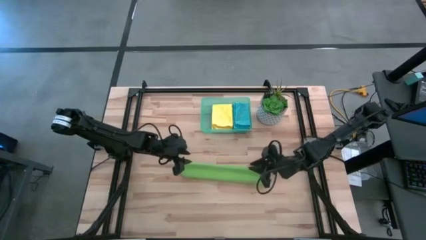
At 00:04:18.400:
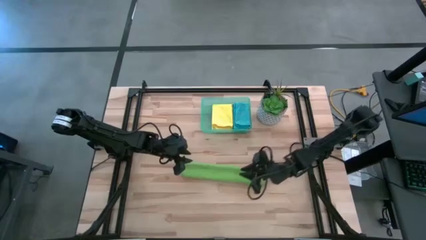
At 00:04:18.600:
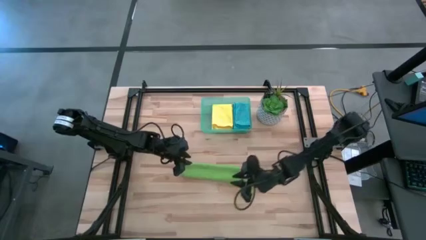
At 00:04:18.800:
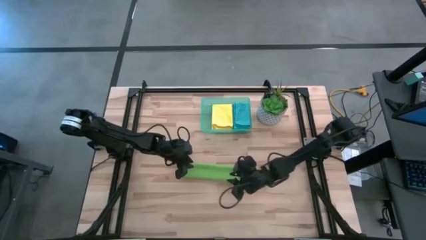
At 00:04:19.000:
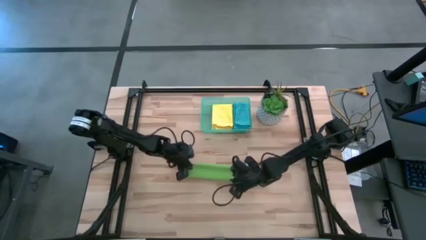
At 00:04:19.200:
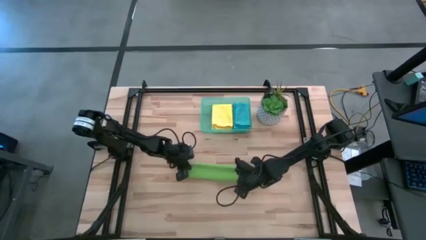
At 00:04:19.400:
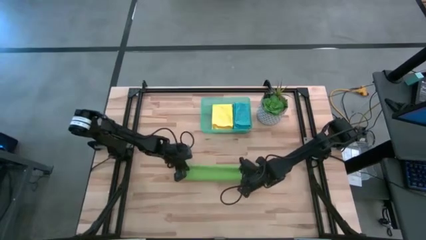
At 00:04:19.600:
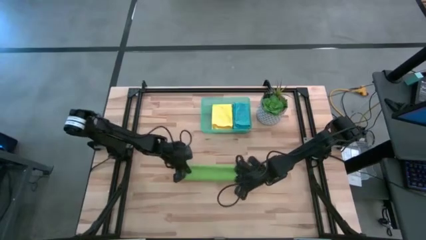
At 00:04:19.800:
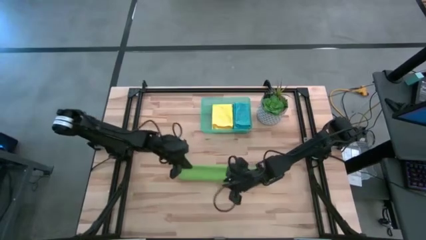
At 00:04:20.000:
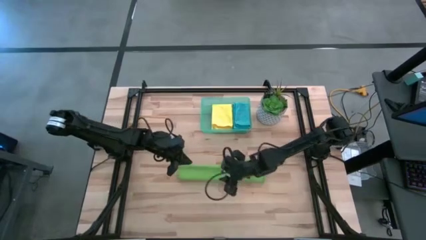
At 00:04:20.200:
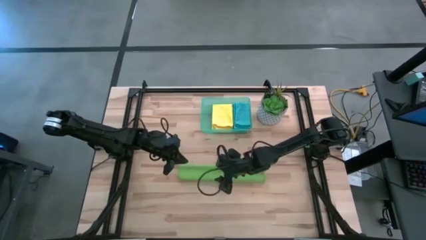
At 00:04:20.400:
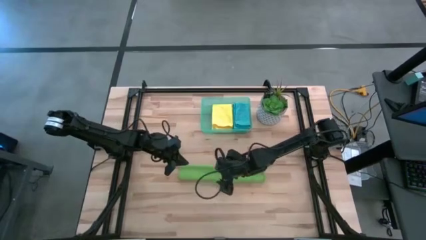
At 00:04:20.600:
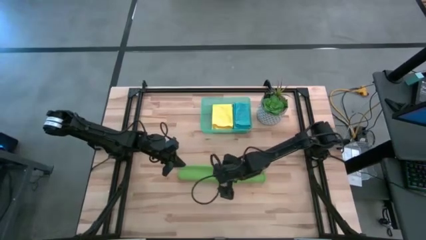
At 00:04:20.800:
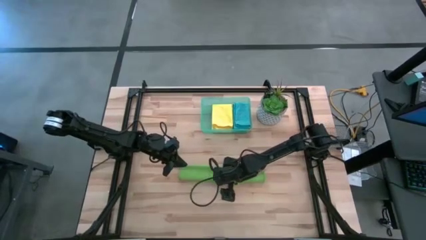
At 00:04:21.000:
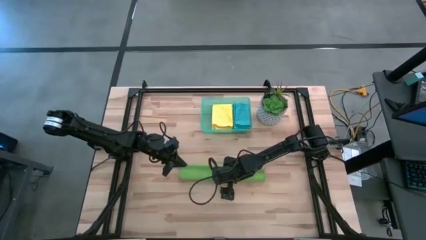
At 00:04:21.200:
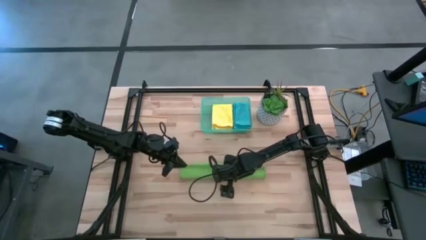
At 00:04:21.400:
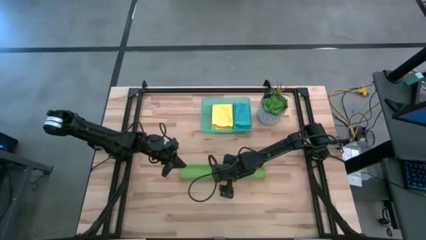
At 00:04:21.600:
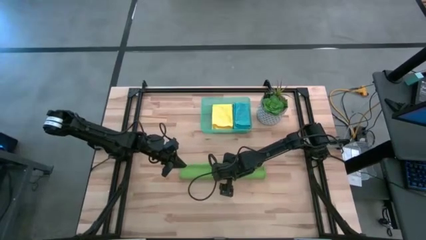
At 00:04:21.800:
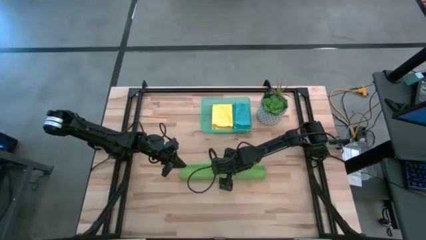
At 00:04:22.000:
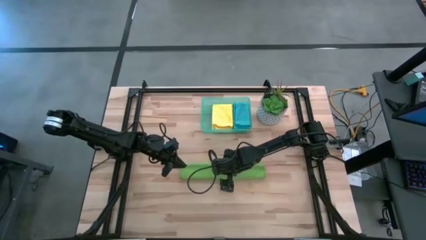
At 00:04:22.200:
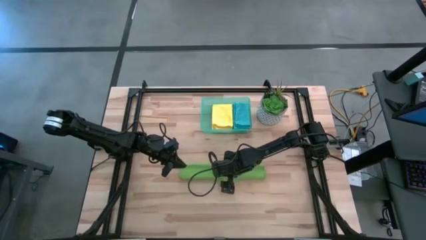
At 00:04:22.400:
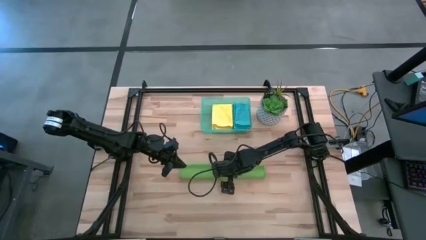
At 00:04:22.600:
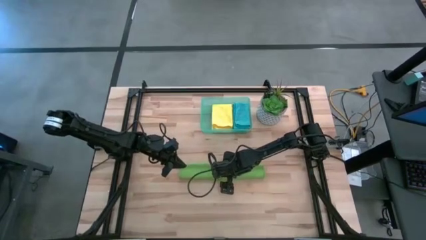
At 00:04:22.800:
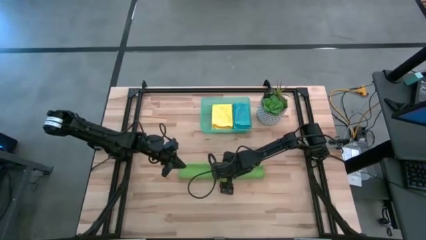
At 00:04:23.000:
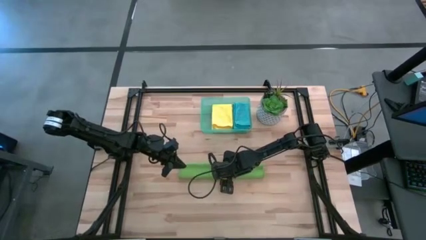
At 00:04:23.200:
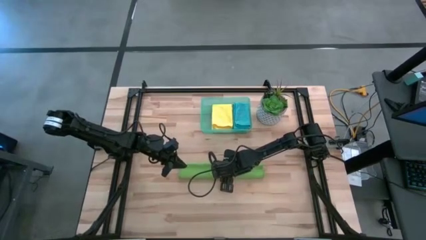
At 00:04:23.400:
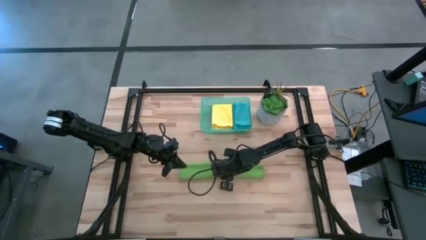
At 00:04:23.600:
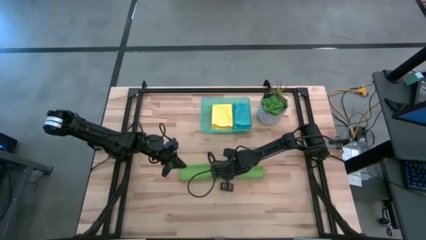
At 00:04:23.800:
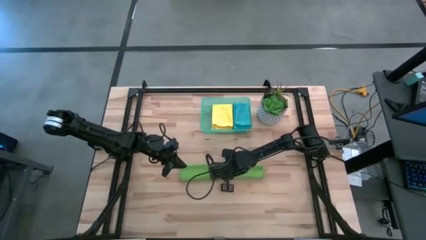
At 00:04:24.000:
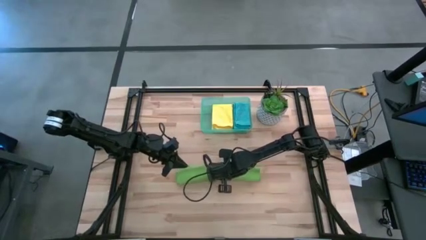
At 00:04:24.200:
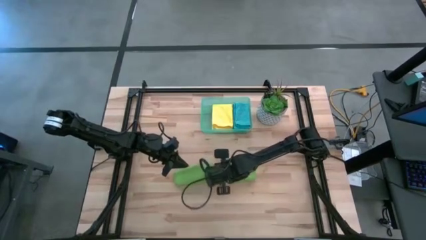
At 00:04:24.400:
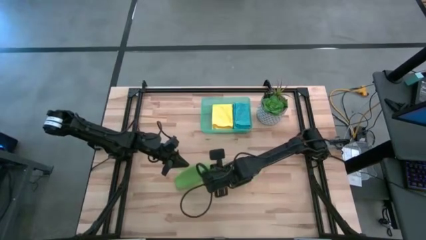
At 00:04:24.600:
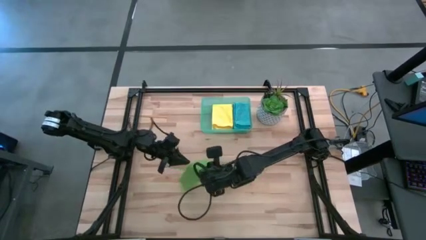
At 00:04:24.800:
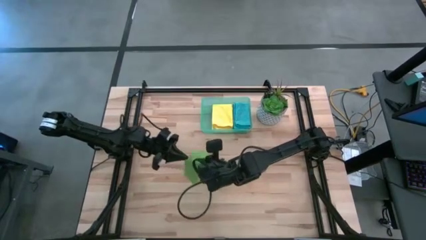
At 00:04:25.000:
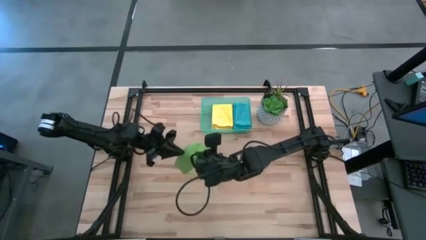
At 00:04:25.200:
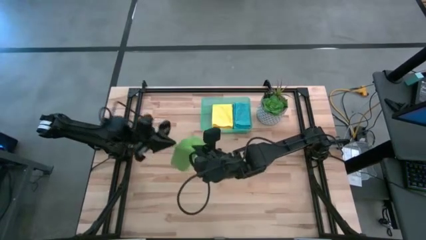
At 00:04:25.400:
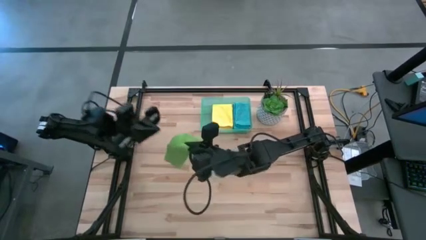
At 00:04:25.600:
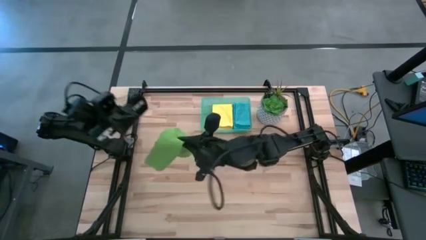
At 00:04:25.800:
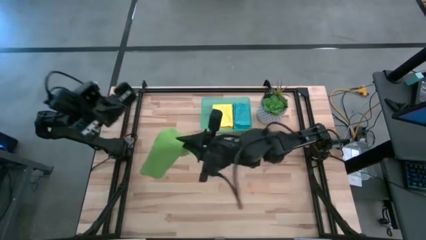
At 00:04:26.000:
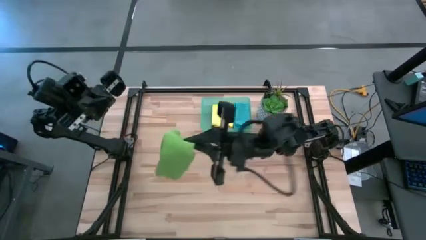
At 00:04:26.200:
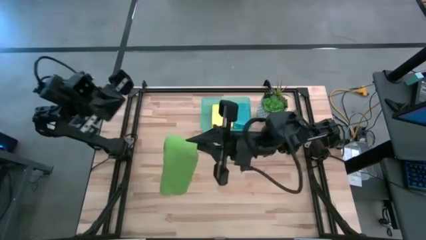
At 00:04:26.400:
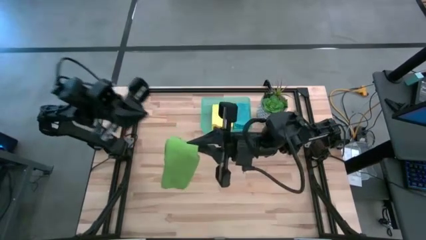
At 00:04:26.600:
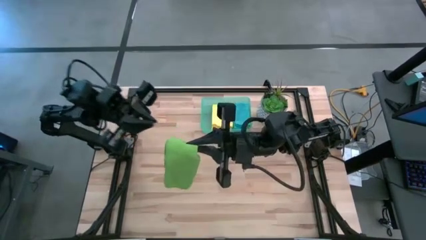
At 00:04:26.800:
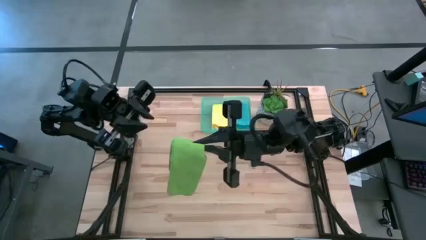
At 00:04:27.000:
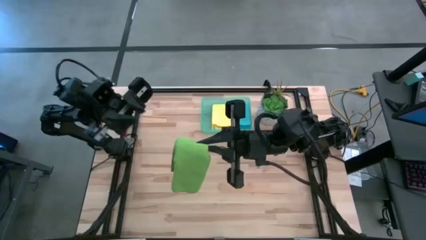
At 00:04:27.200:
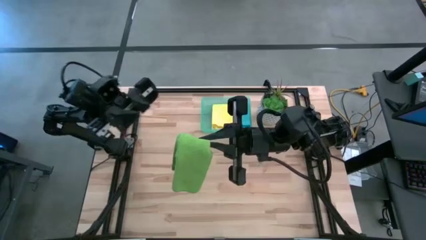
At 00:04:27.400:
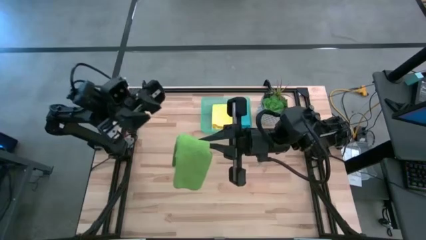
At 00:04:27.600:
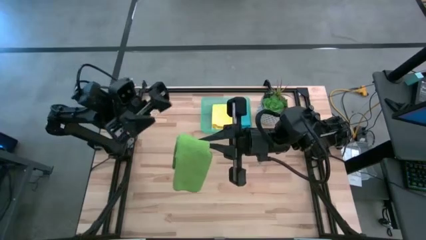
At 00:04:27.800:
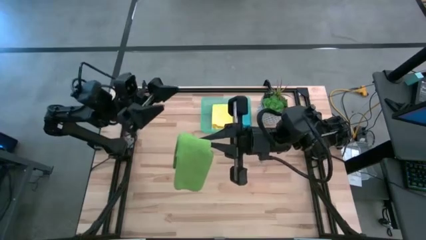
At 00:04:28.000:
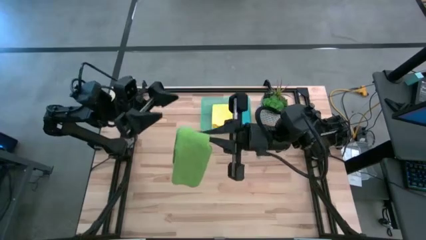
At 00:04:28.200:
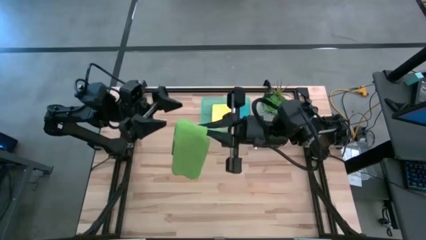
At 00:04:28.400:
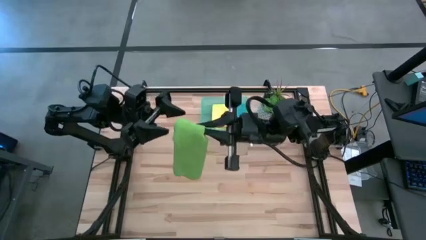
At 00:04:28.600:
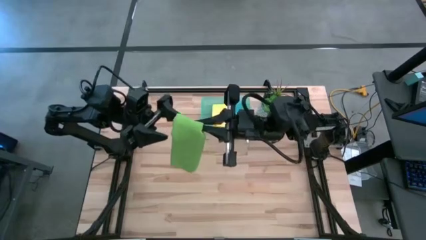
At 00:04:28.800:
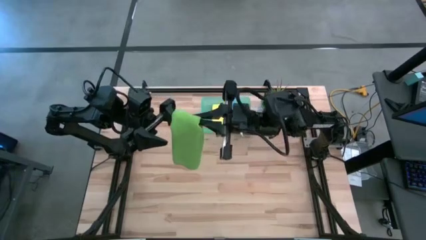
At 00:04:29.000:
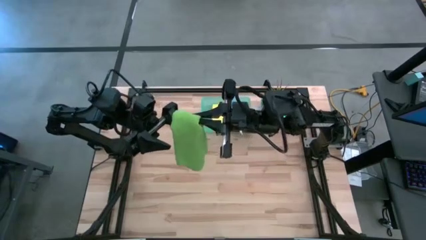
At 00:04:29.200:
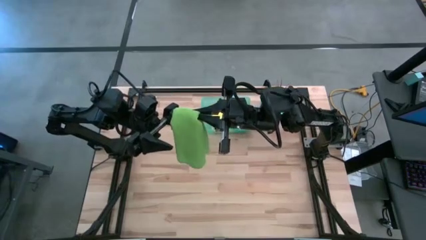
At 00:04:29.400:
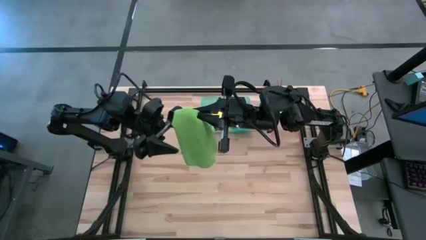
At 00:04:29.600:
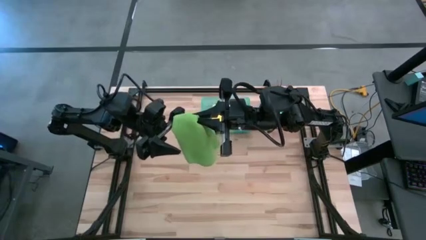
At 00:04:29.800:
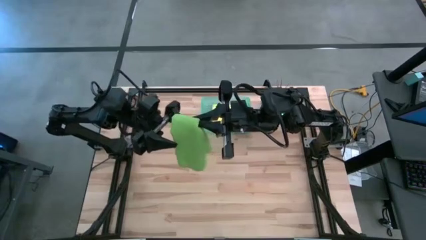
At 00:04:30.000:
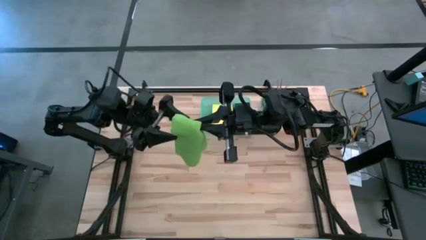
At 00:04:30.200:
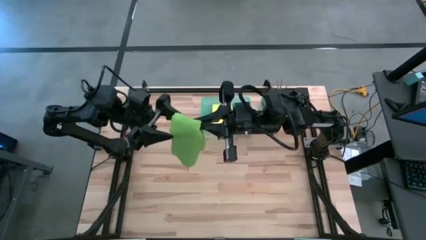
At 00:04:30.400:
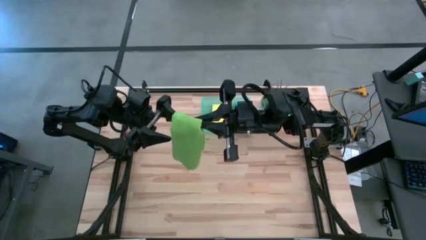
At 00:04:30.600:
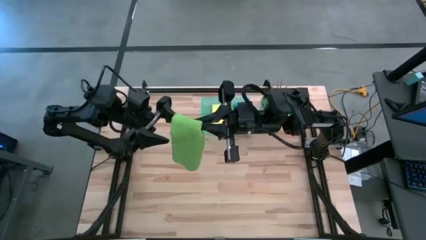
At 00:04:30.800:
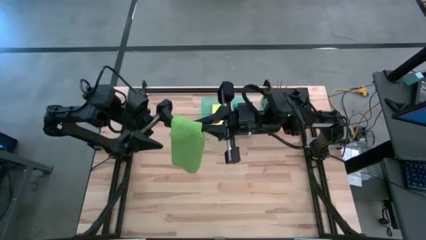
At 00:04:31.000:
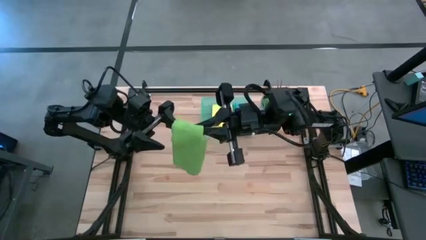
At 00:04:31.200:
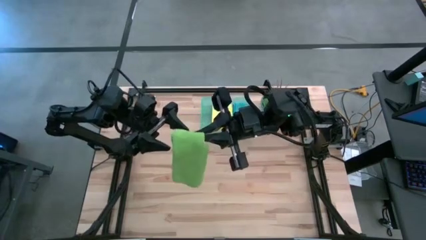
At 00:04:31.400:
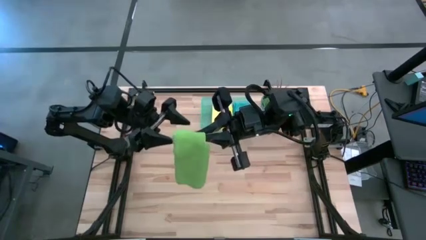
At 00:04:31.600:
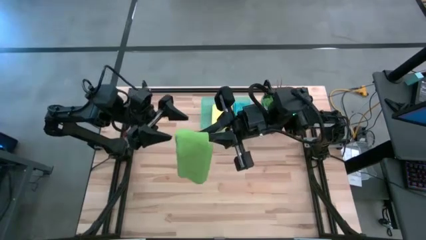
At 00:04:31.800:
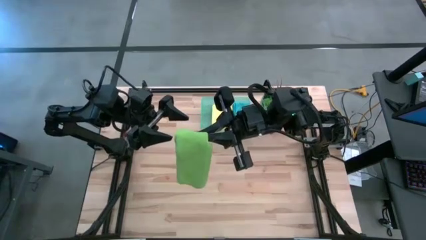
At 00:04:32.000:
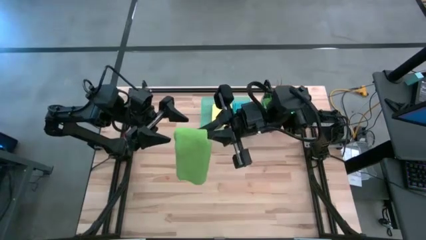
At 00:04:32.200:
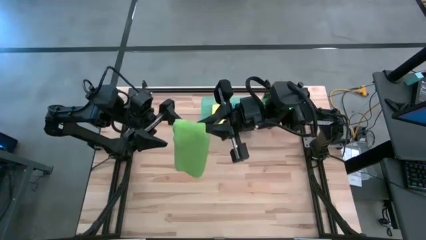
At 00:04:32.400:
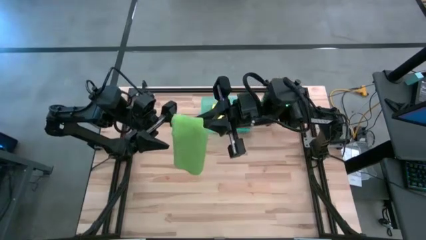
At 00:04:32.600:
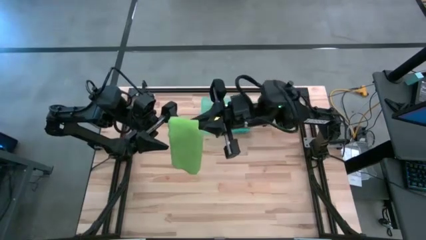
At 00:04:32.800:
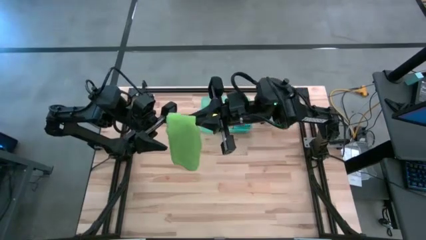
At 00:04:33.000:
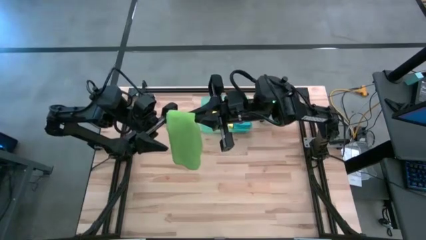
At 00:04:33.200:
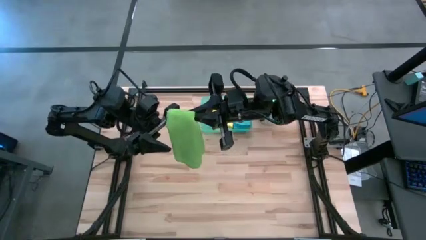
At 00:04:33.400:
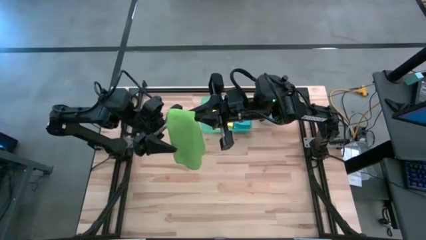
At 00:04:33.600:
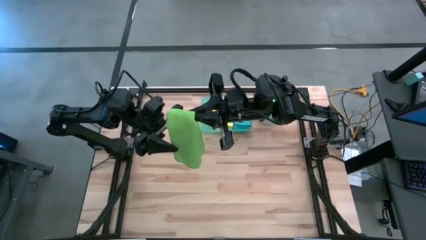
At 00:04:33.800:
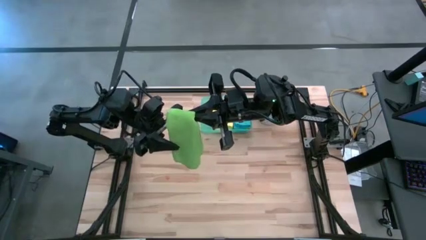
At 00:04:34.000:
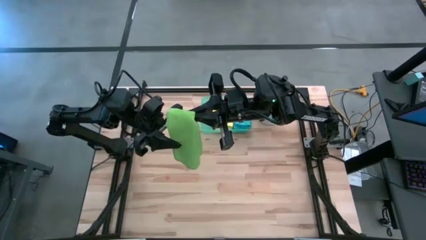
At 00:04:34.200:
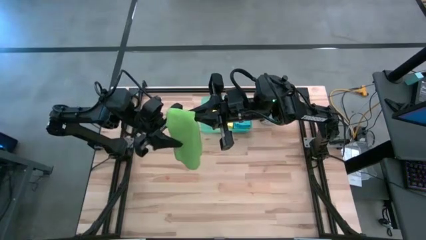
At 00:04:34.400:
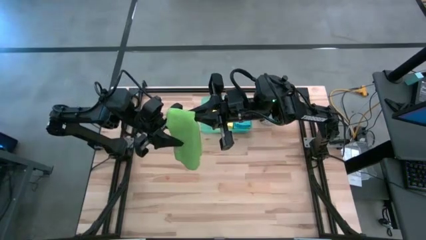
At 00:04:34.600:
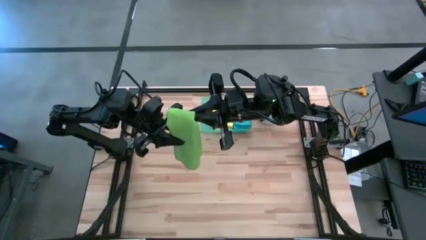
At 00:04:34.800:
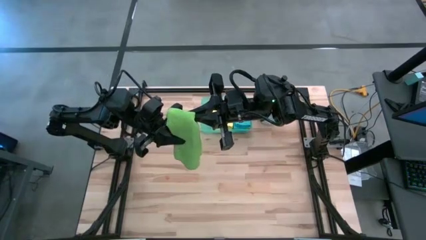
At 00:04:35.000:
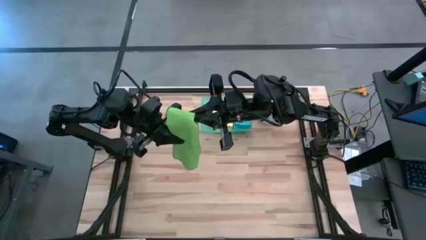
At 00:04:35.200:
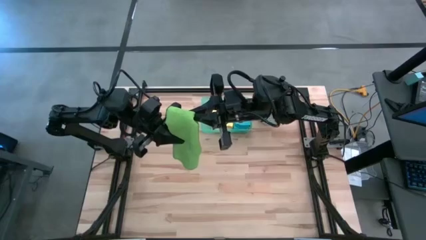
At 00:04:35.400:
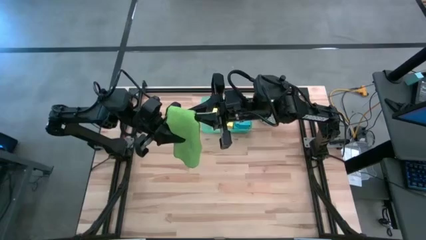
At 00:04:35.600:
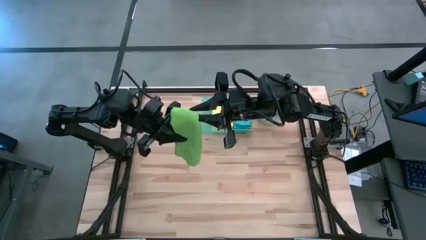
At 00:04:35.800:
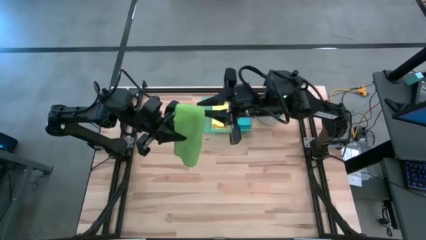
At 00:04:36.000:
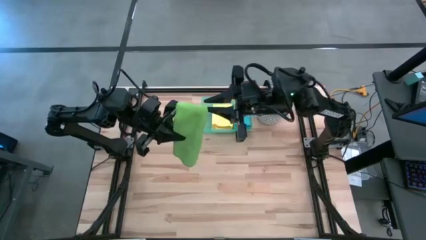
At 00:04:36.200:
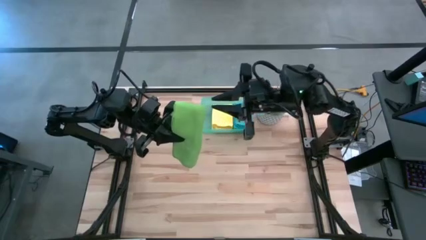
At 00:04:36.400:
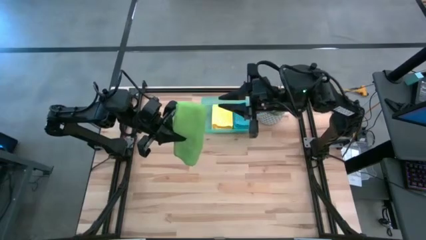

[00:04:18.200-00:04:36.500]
Task: Fold microfiber towels
Fold the green microfiber cloth
